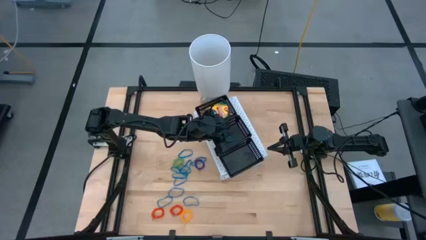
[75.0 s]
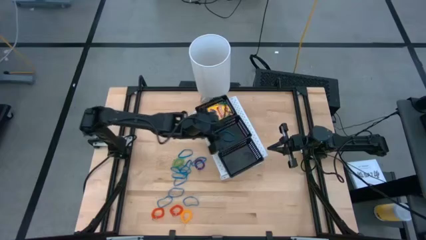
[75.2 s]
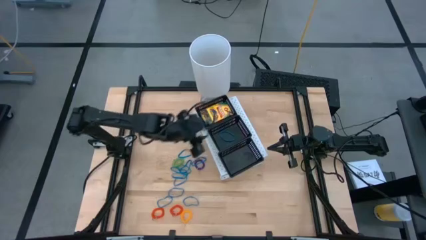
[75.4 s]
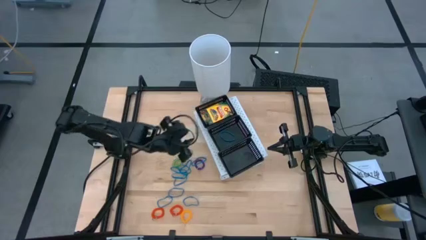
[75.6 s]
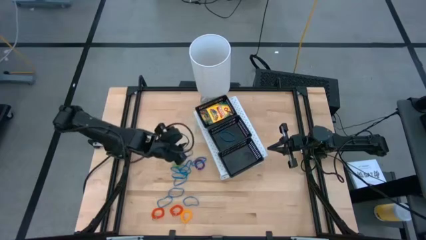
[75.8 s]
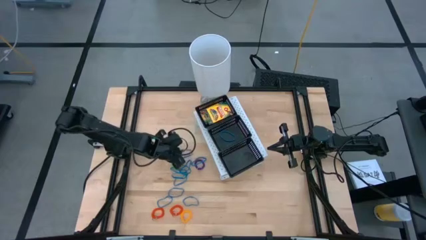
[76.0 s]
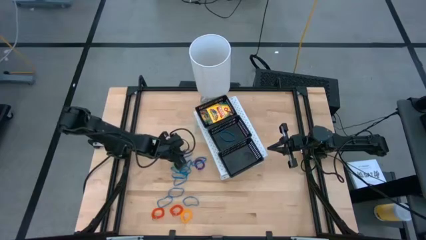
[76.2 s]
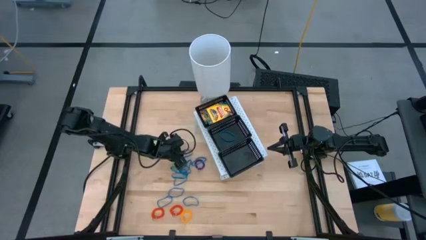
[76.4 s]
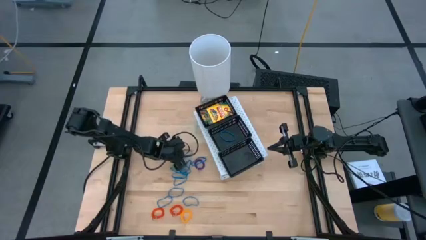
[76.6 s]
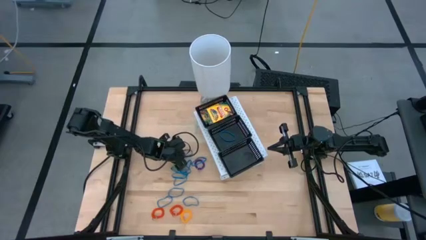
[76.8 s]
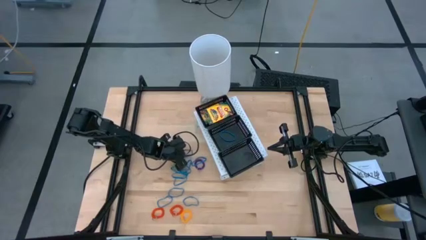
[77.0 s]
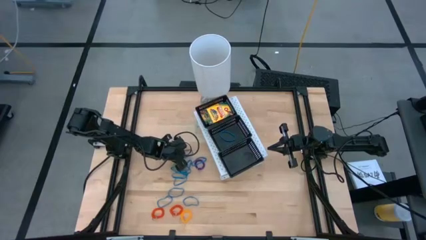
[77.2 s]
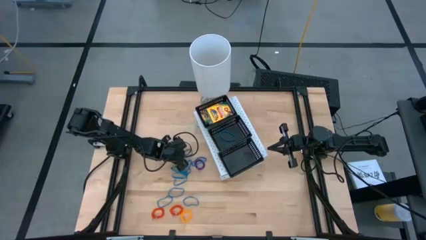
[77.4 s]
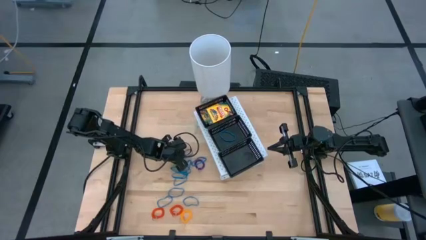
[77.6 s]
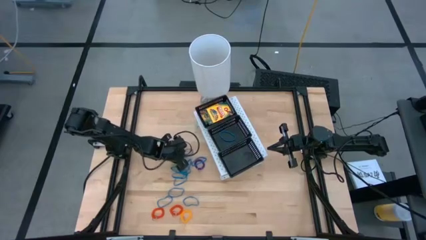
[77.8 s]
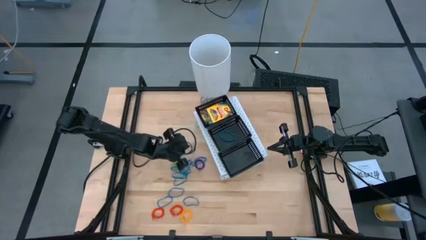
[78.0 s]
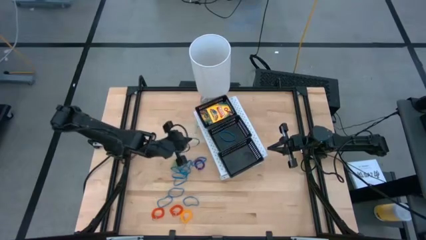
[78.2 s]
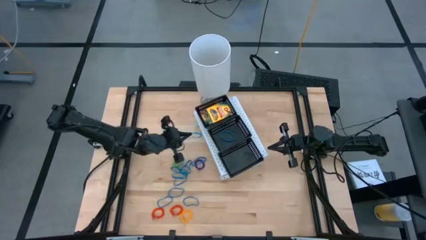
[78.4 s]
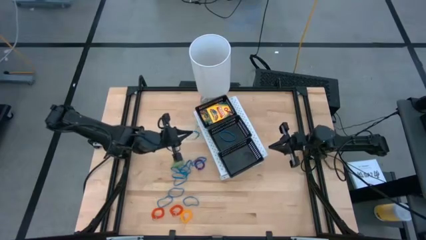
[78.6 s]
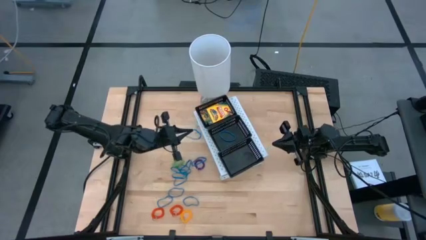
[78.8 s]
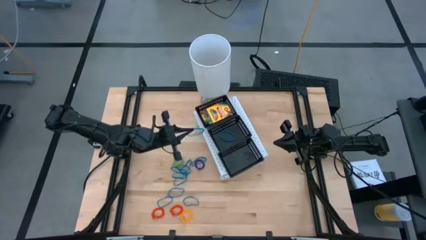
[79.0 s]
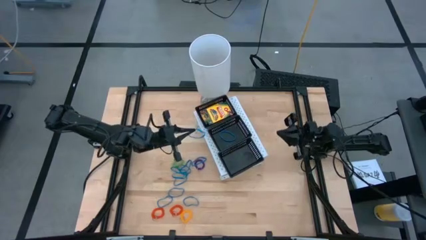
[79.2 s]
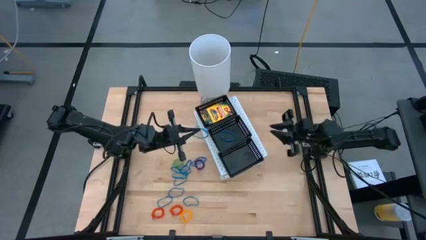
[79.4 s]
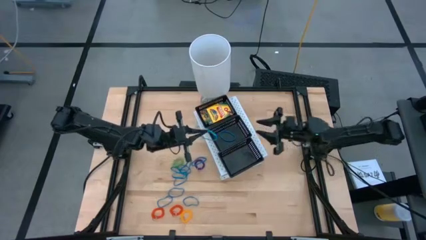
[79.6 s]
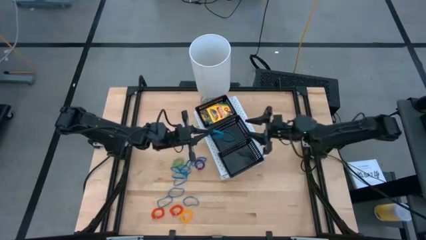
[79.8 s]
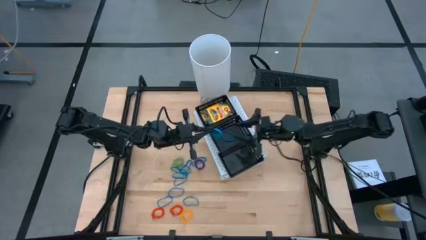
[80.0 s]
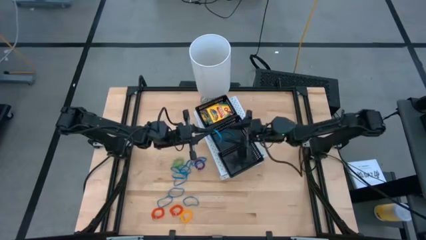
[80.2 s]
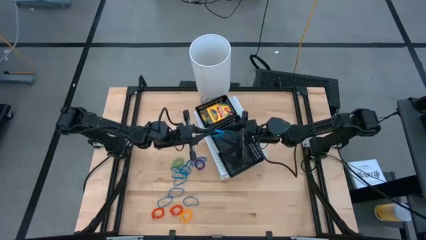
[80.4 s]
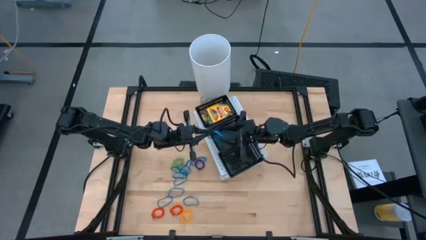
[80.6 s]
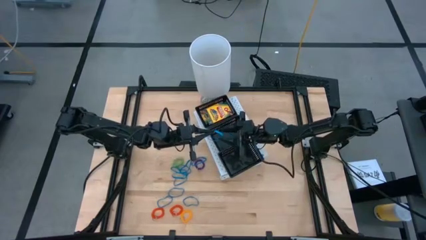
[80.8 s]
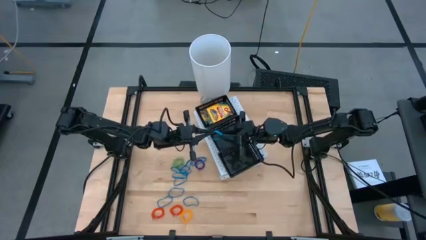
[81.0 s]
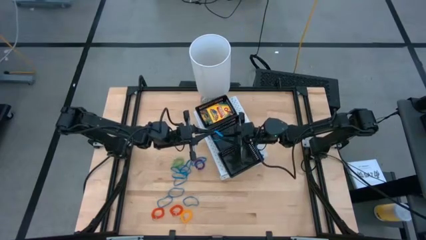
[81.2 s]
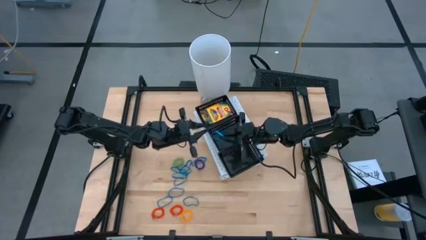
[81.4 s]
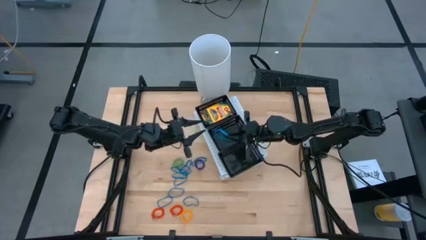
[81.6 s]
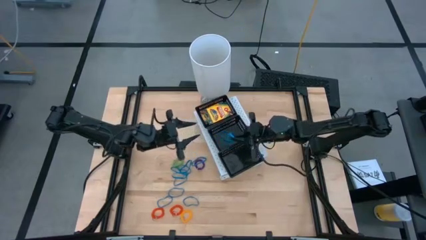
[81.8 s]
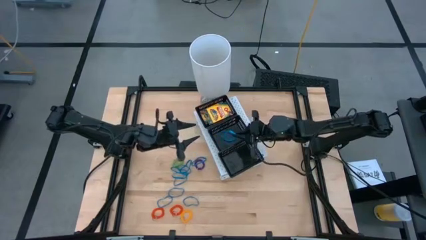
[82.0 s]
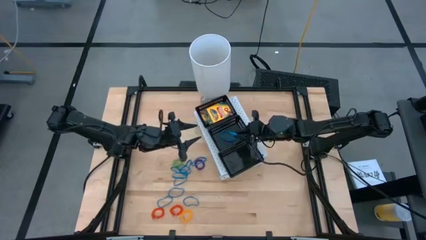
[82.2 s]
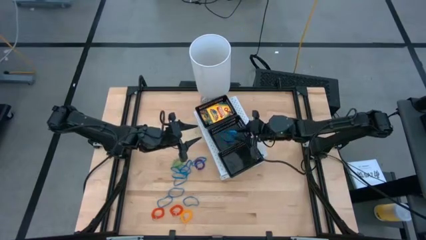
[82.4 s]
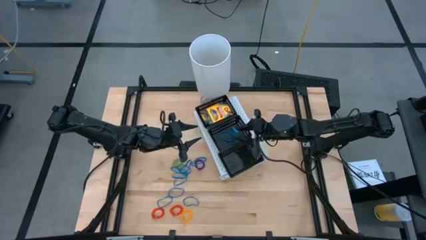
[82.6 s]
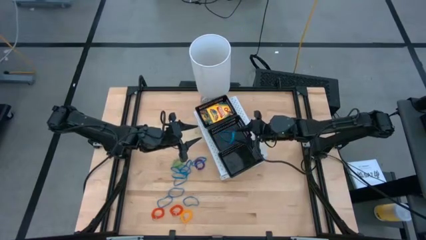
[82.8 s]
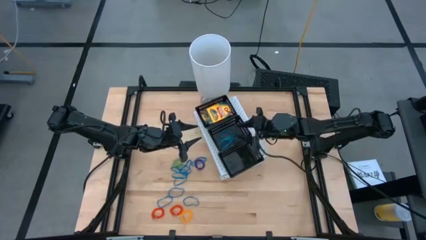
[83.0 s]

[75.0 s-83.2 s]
Task: Pick & Place Office Desk Supplies
Put the blue rubber band into the middle black bin on the shelf

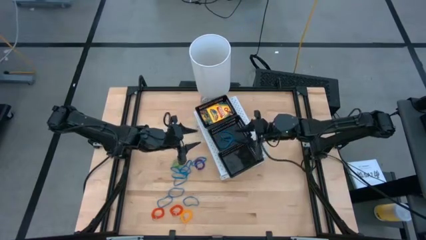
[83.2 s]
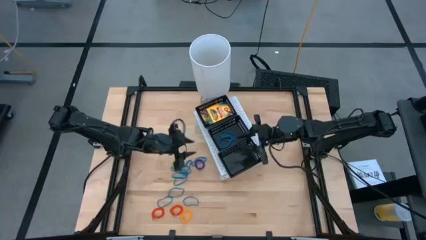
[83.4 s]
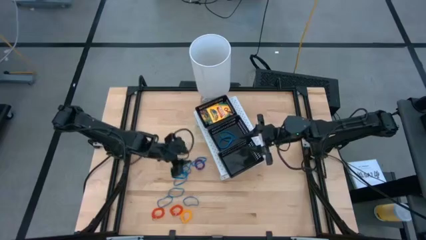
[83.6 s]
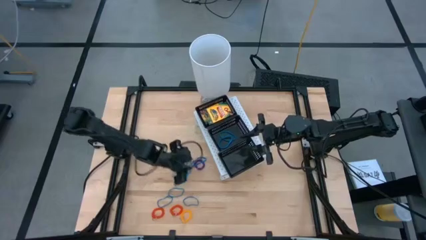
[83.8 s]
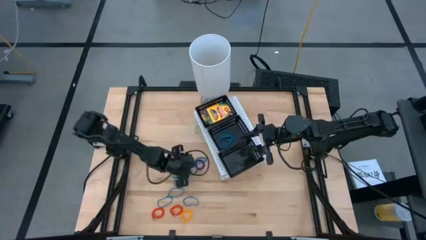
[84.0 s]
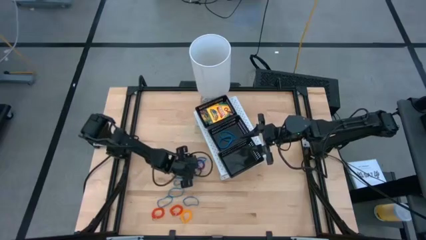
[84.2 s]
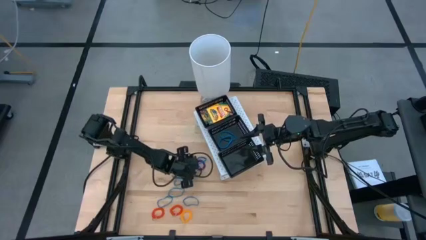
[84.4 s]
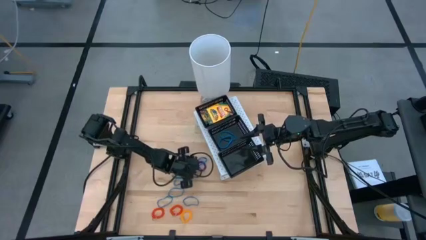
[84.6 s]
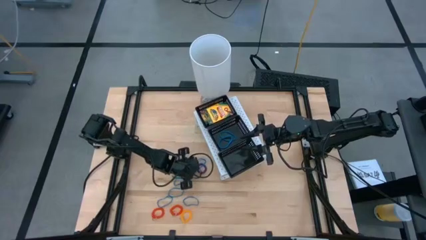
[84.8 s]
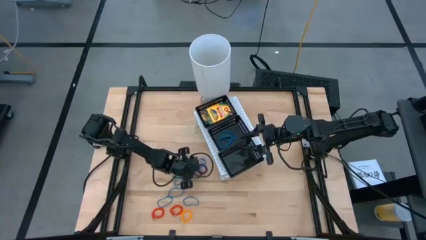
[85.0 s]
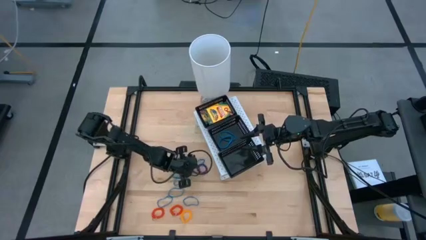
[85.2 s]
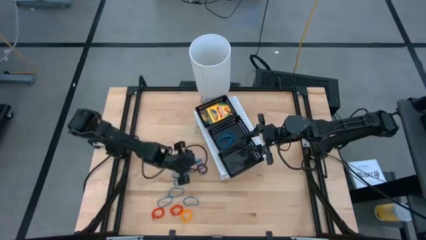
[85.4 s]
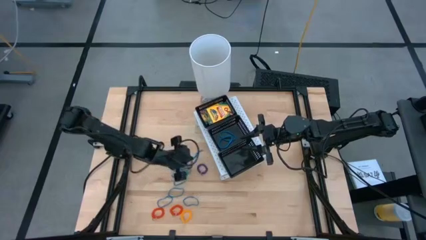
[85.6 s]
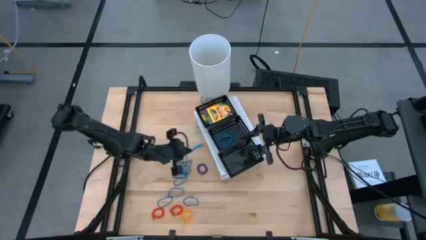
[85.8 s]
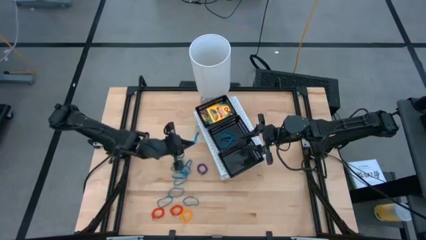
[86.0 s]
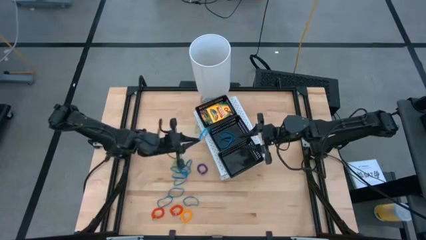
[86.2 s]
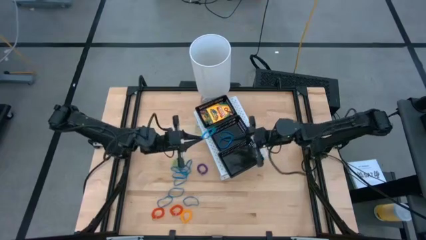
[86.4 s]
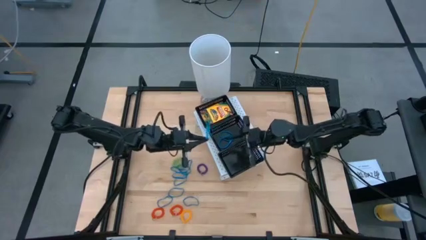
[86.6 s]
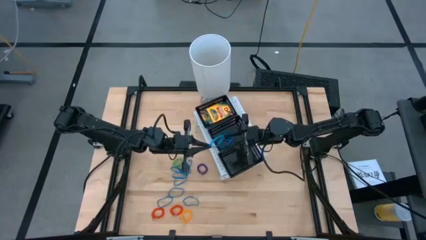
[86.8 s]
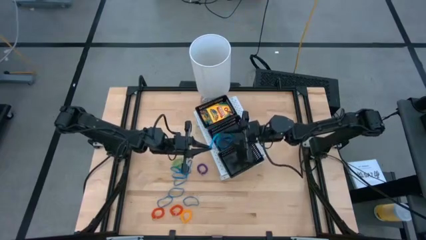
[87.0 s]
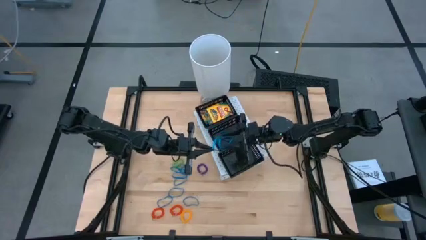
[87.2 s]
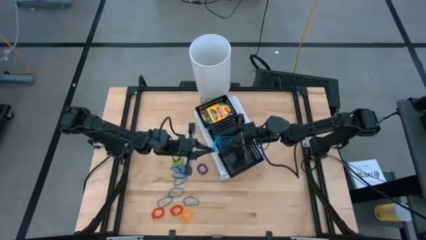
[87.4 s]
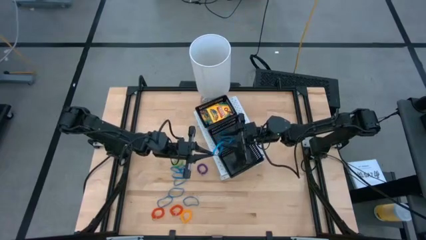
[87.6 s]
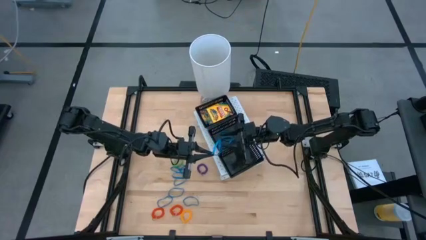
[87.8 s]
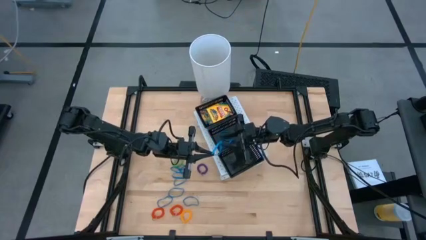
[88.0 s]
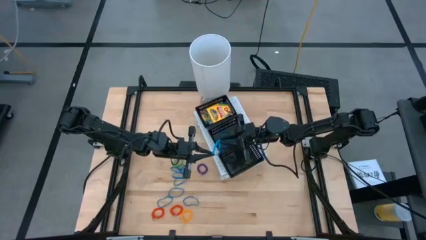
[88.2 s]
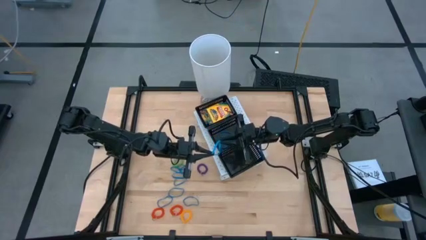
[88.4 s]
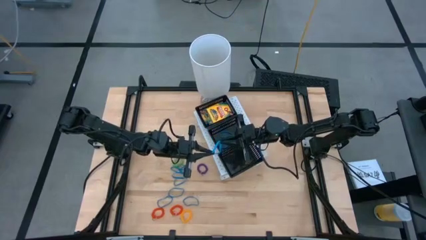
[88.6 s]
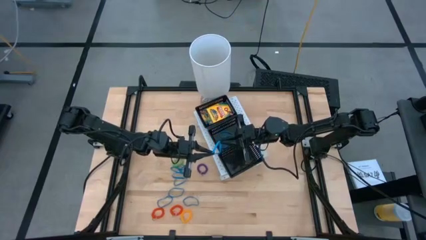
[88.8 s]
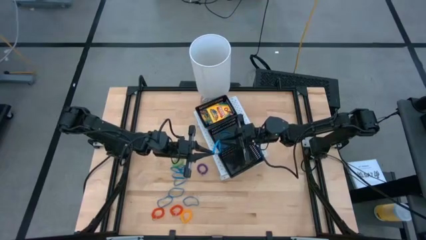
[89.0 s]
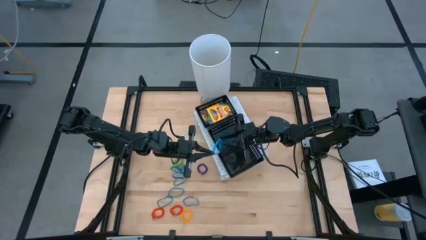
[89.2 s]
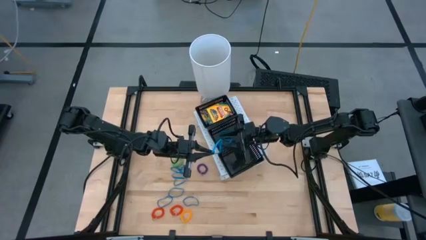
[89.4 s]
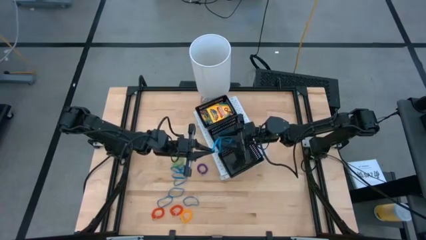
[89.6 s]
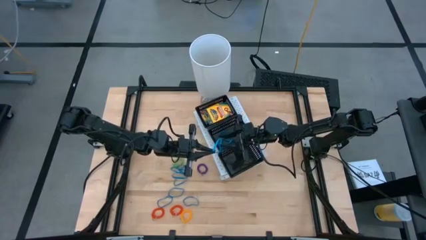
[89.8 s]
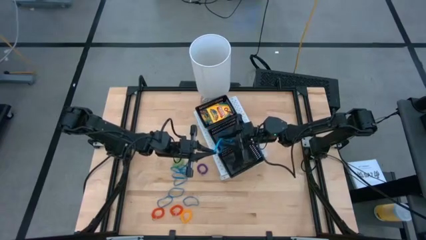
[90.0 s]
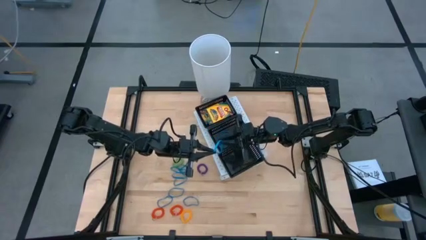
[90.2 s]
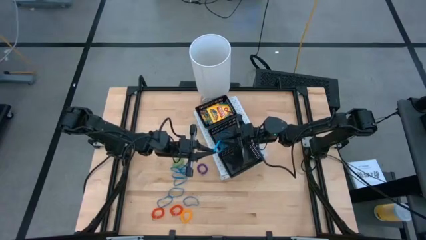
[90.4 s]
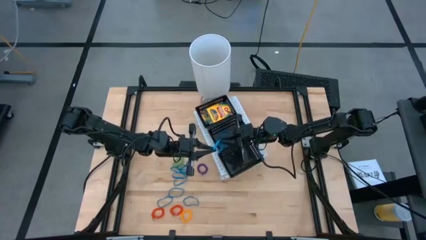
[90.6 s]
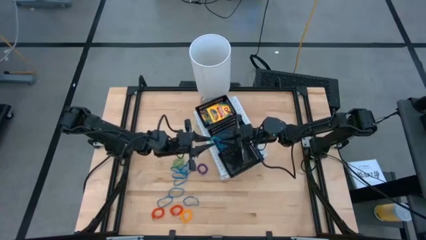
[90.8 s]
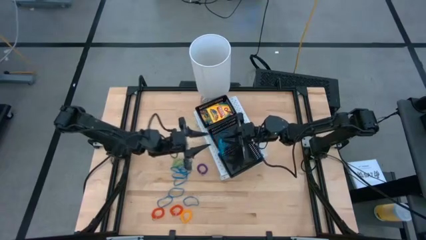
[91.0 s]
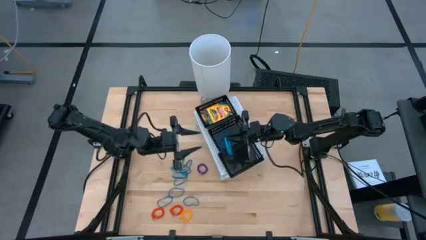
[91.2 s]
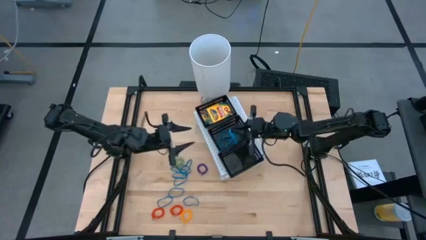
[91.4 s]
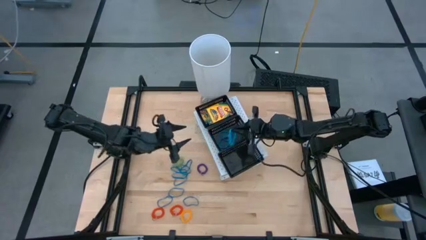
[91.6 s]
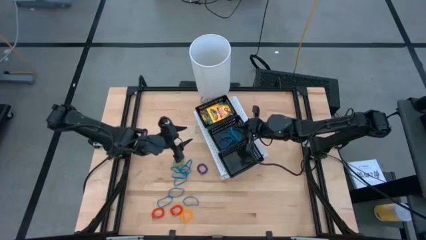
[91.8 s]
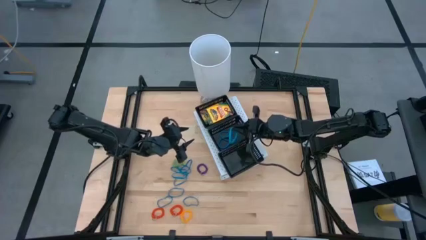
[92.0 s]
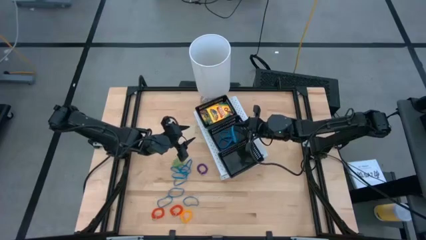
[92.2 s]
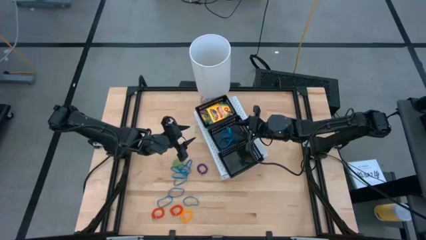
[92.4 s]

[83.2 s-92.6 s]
Put the blue rubber band into the middle black bin on the shelf
